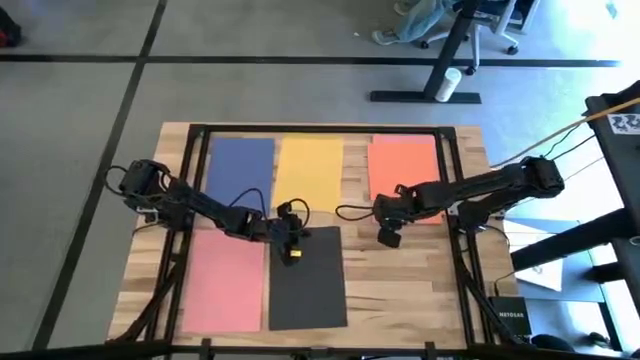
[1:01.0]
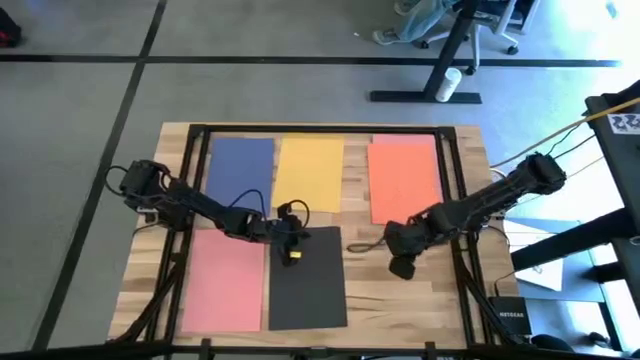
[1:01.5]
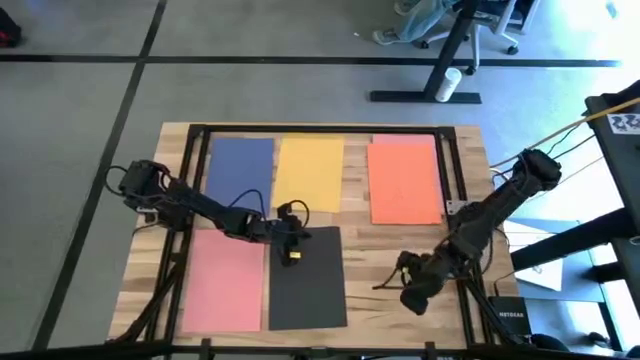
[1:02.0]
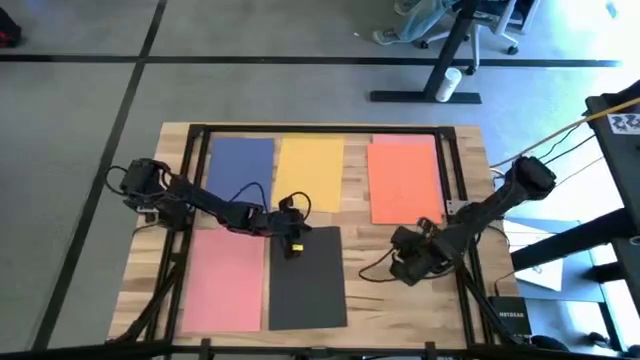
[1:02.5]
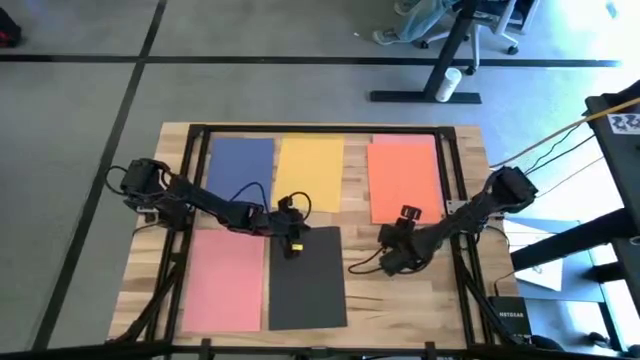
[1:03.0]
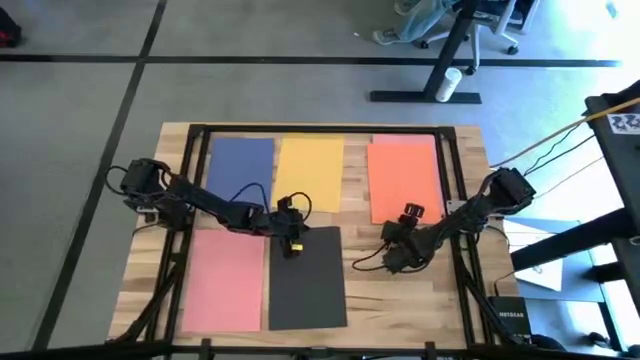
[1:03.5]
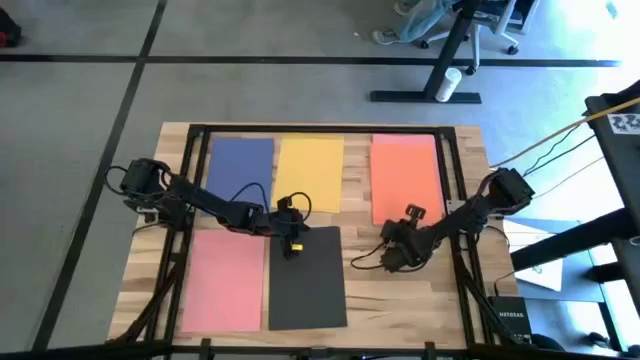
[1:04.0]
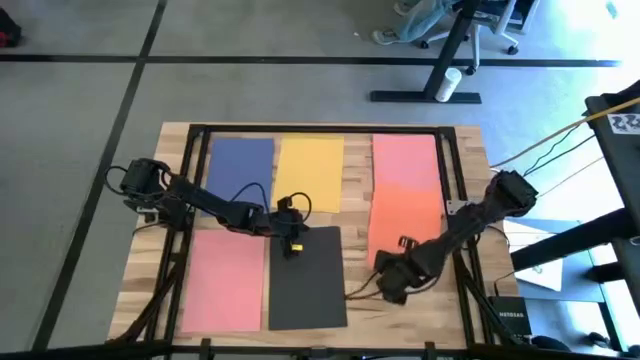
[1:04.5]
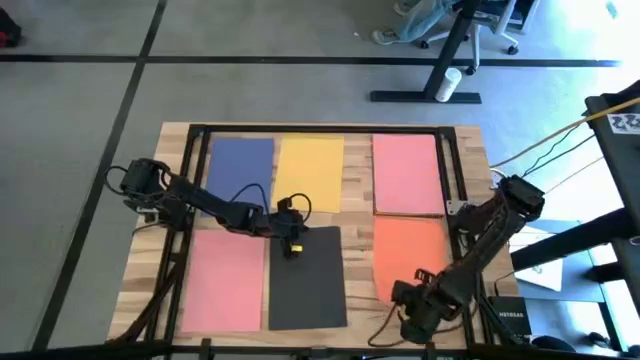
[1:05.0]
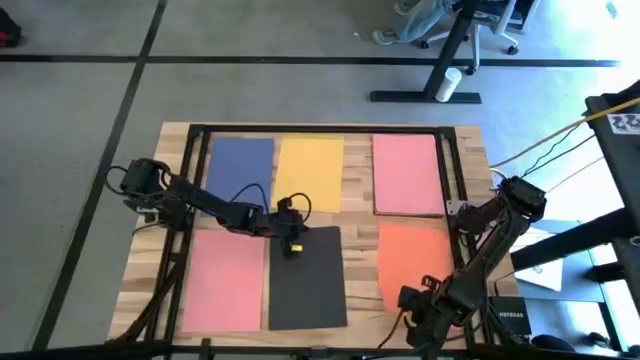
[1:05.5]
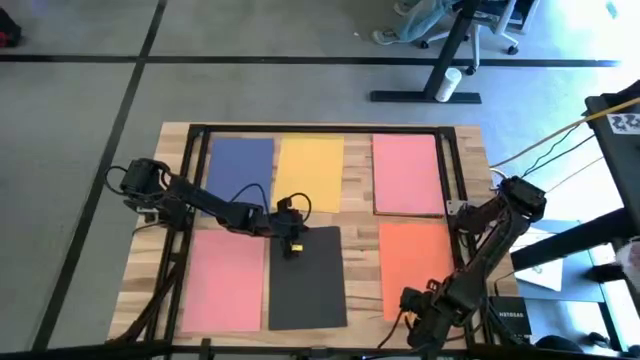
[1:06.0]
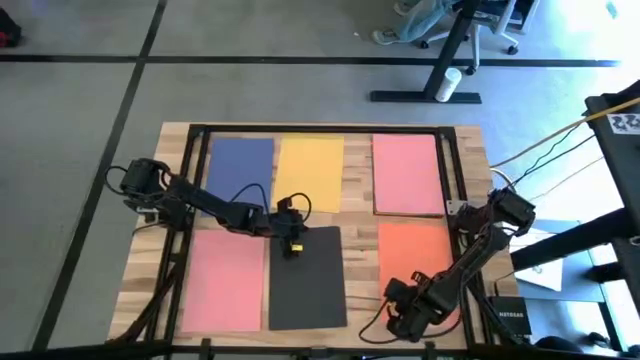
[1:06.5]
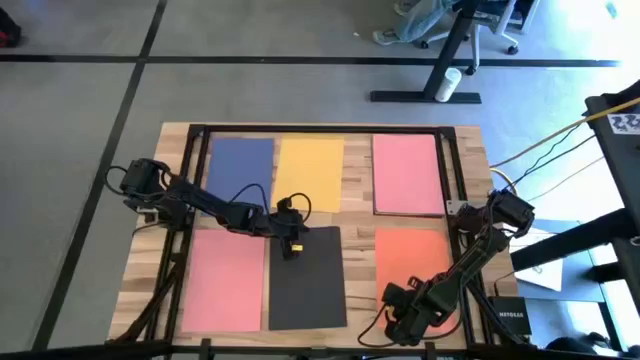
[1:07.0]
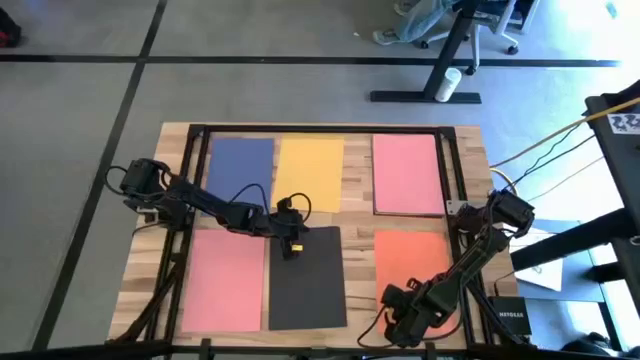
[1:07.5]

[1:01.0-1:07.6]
Task: Organize paper
Move the orange paper to the bottom right of the table

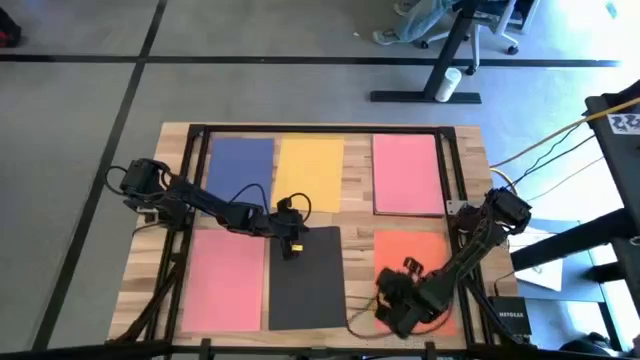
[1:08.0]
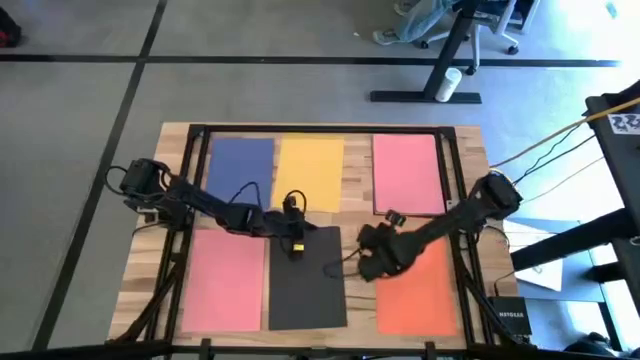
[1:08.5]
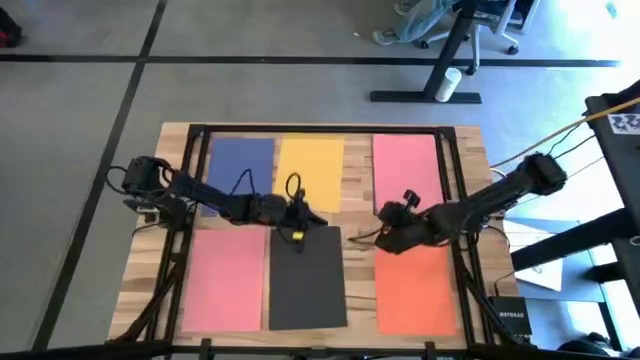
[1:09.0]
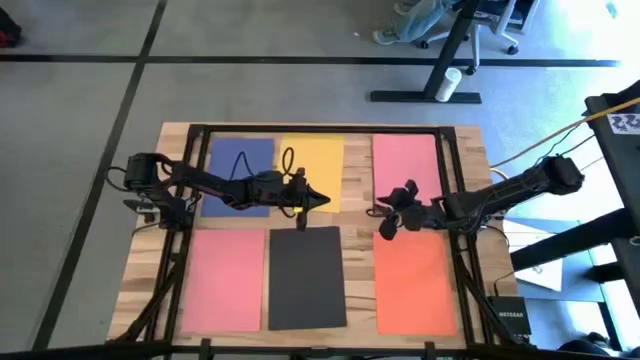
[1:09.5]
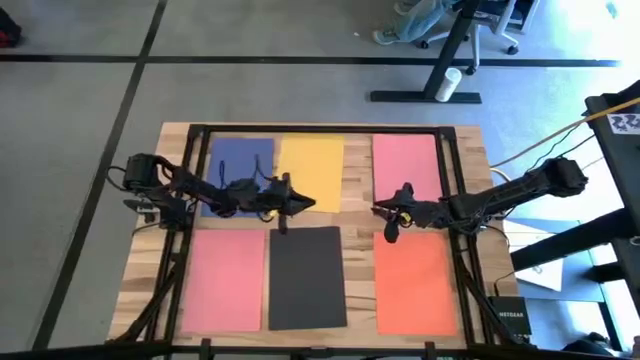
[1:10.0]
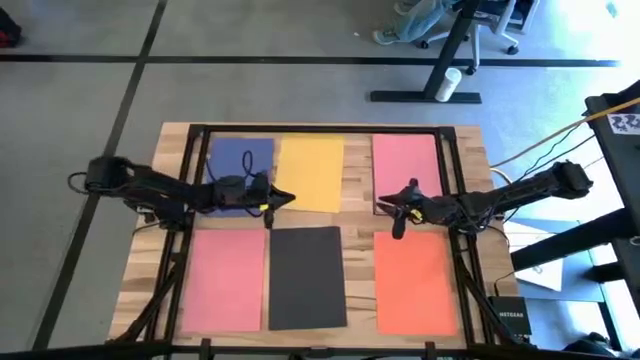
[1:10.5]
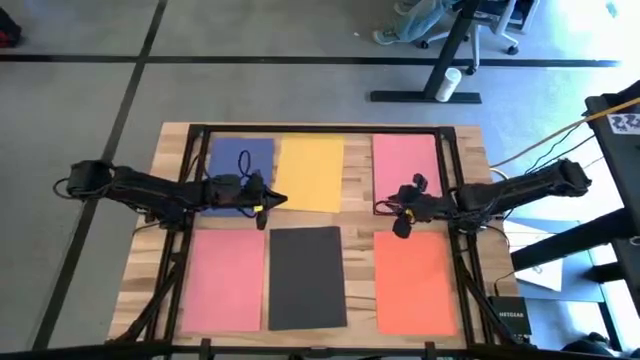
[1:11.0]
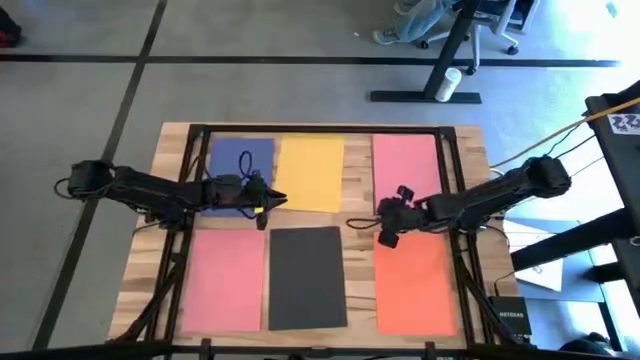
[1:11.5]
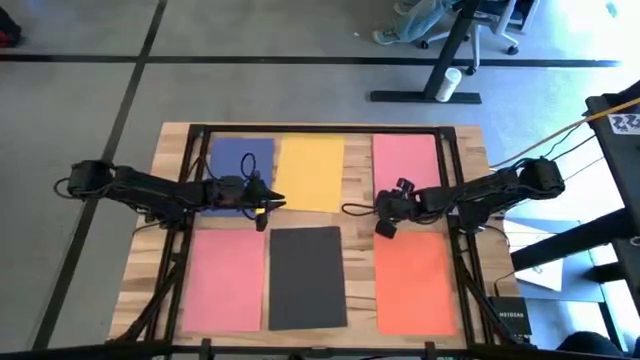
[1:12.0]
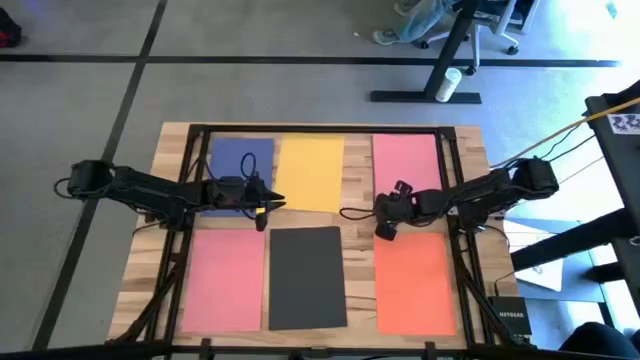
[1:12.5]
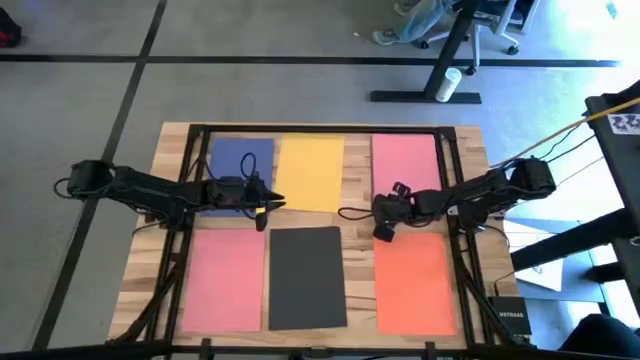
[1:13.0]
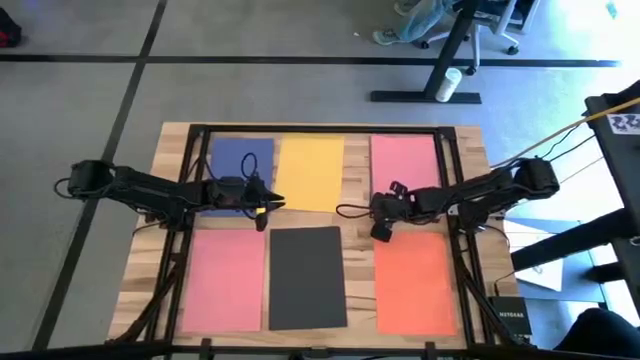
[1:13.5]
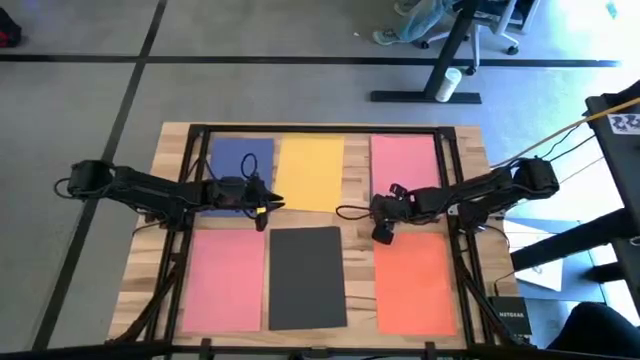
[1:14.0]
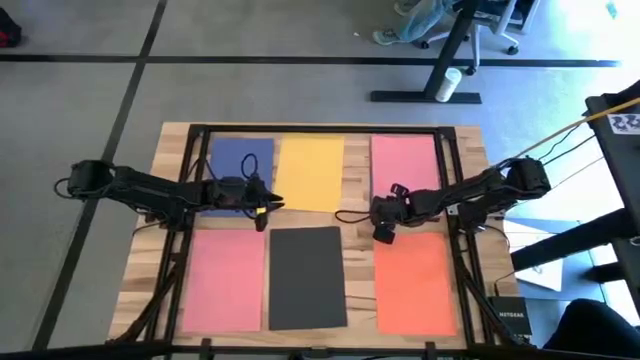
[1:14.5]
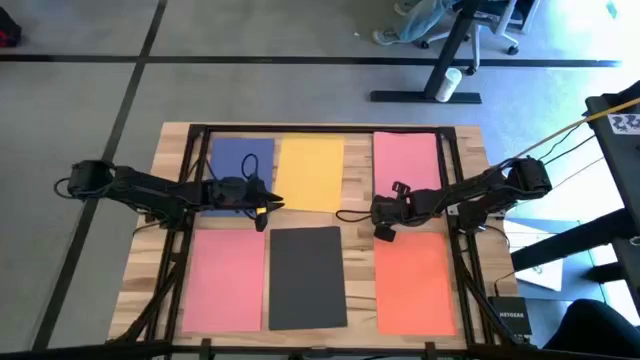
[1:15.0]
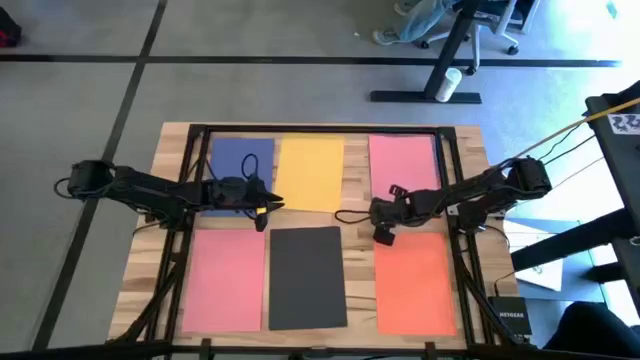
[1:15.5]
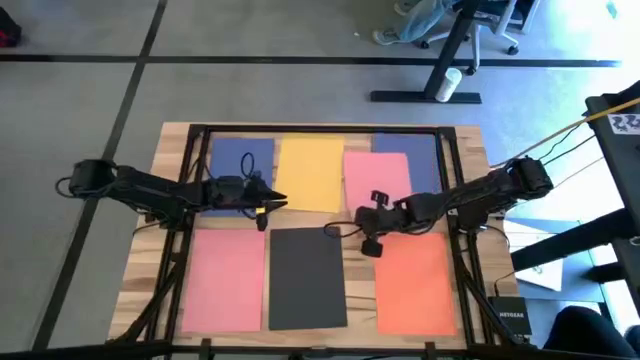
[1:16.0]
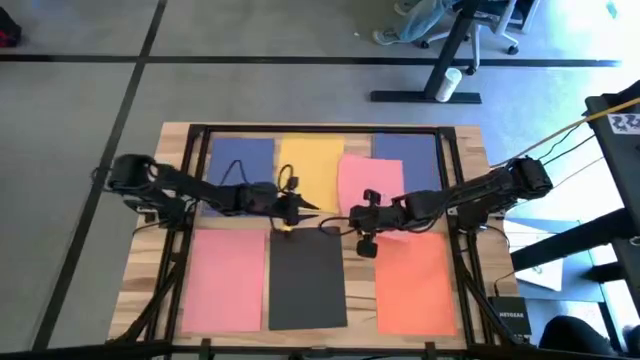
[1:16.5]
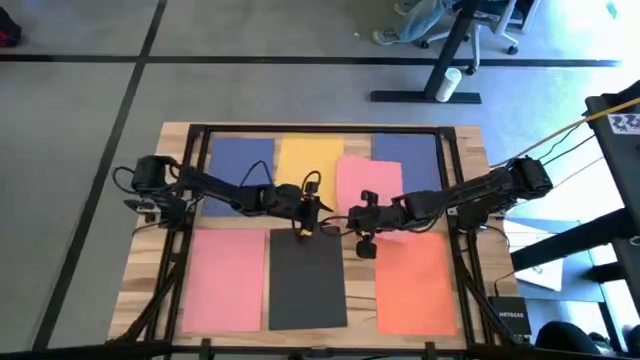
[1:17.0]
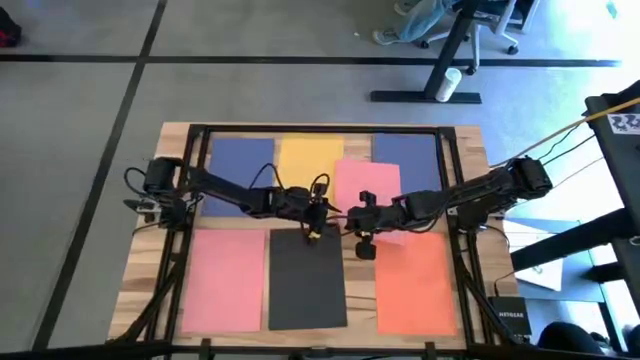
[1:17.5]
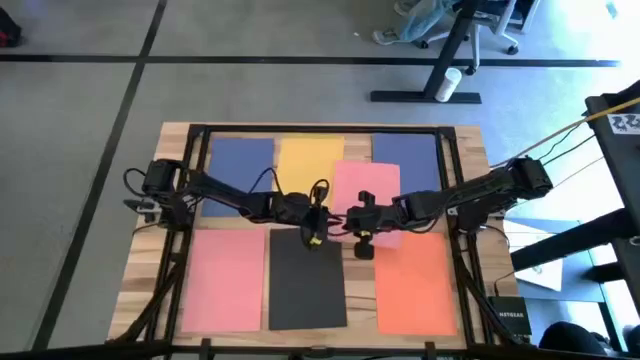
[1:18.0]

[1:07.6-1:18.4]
Stack the pink paper on top of the other pink paper

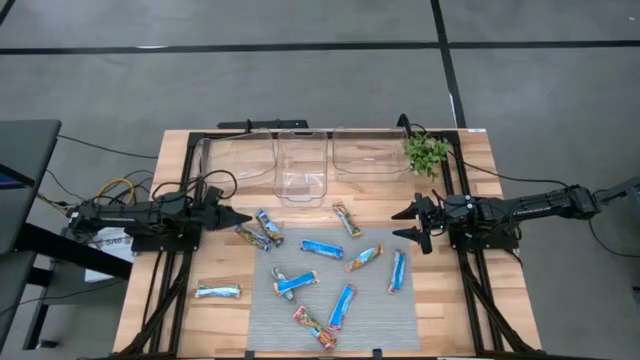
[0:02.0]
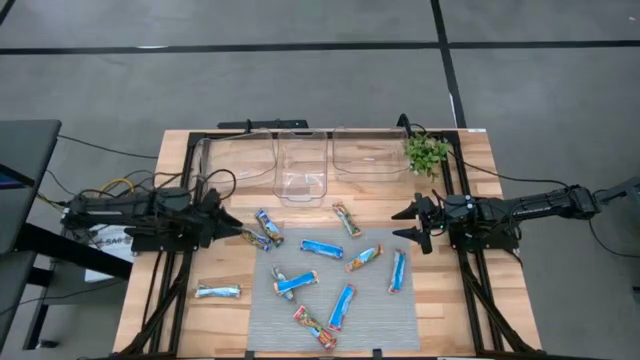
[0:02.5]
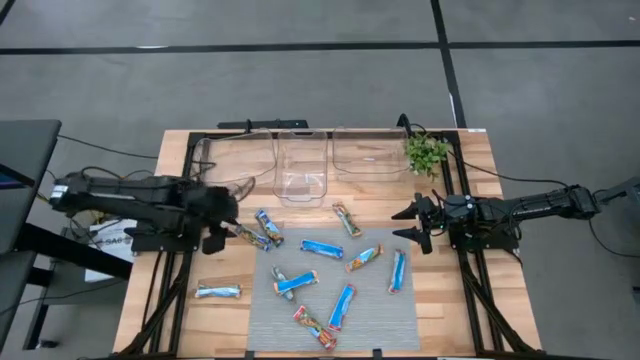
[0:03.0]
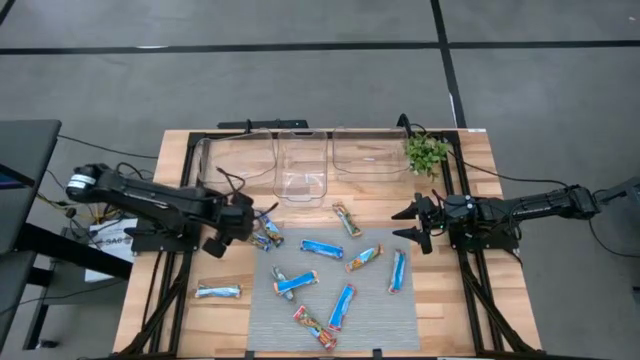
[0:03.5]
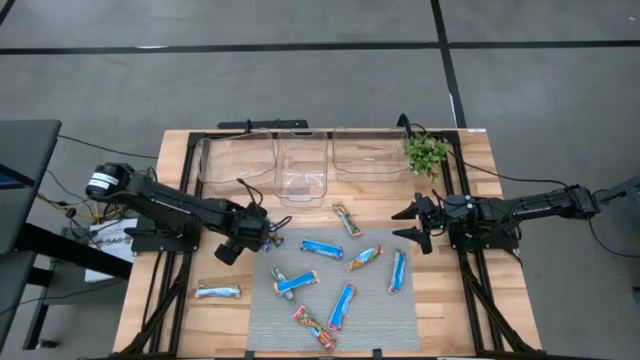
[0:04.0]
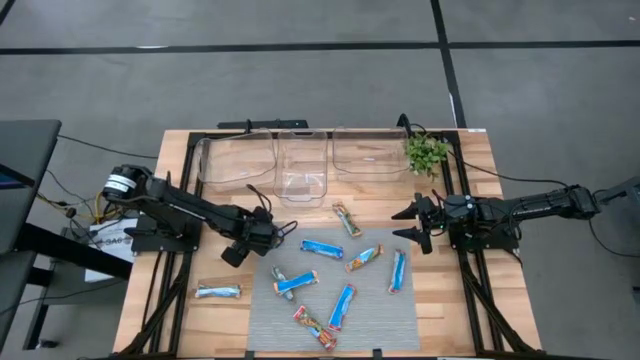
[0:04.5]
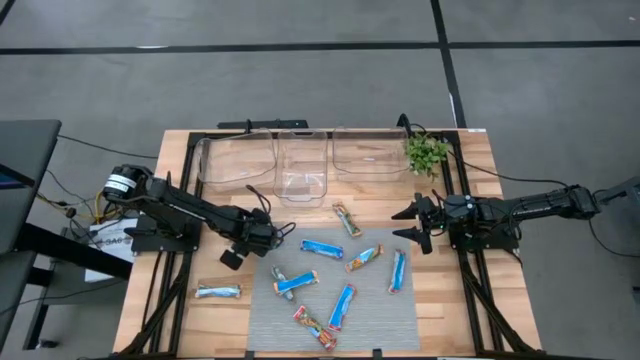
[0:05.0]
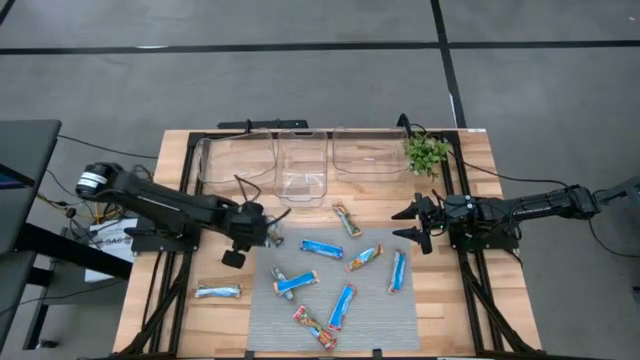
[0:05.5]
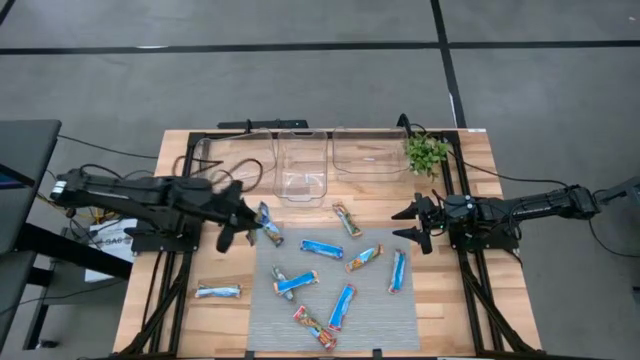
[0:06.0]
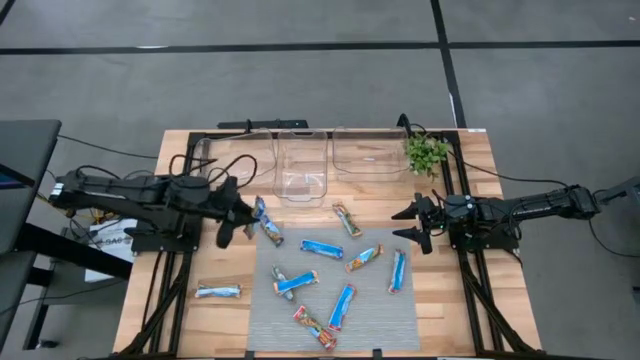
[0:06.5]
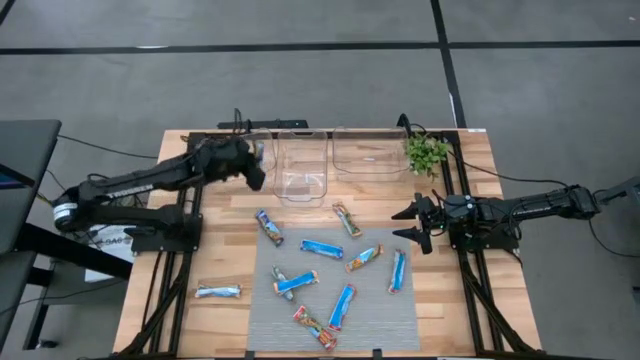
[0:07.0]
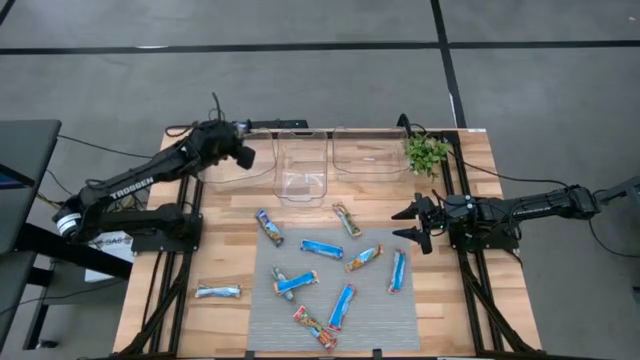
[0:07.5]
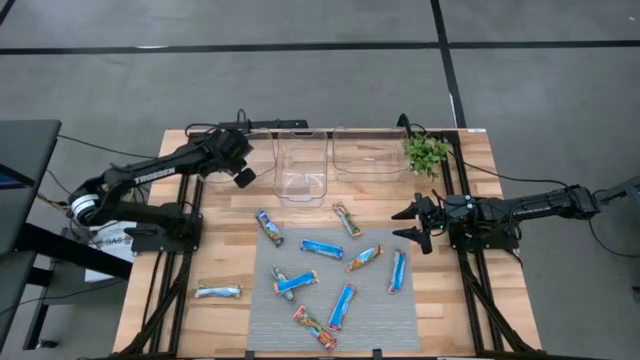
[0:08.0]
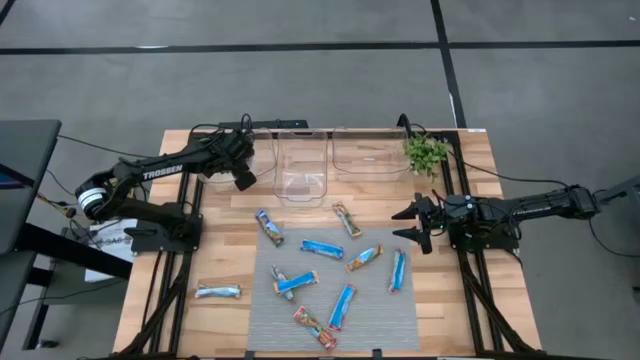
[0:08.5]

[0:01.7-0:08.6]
Task: Pick and place Granola Bars by type
Put the blue granola bar into the left transparent bin
